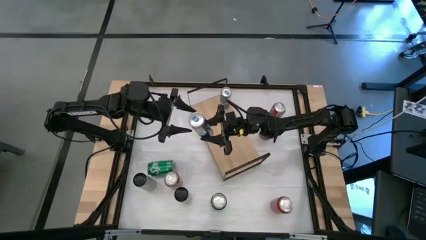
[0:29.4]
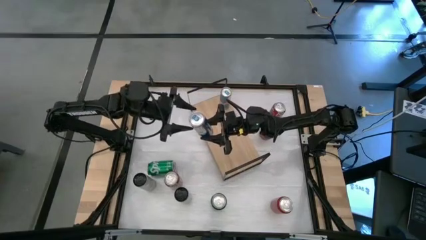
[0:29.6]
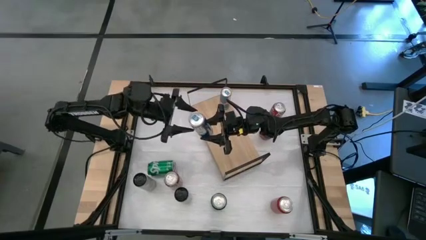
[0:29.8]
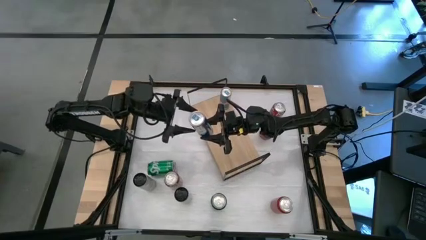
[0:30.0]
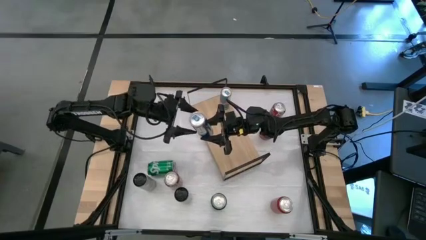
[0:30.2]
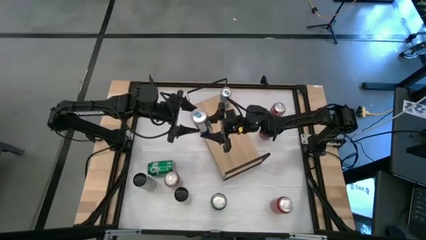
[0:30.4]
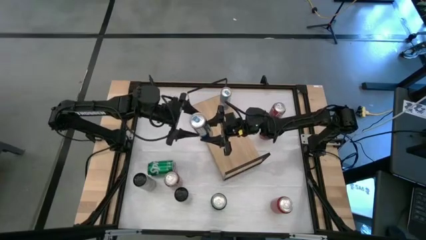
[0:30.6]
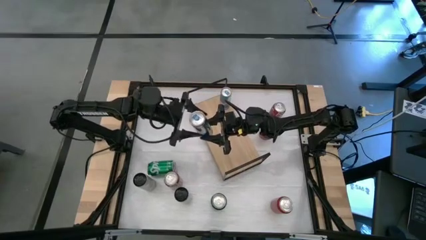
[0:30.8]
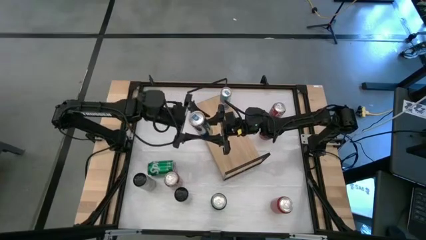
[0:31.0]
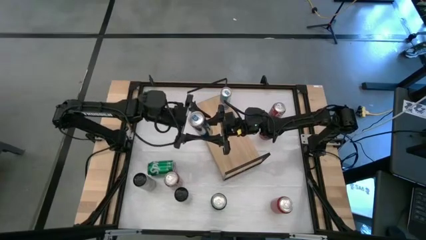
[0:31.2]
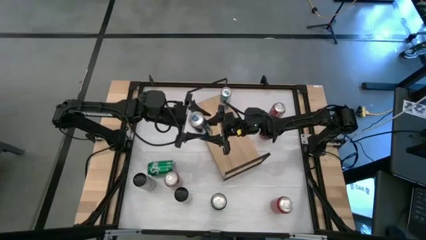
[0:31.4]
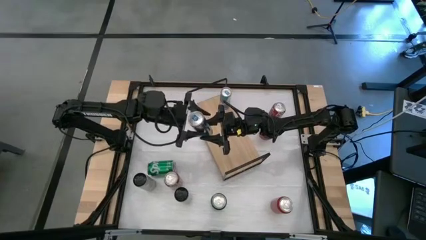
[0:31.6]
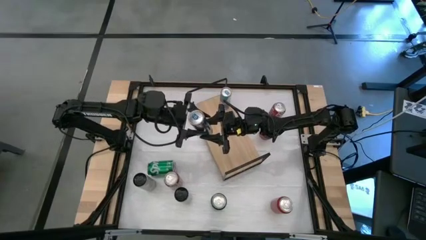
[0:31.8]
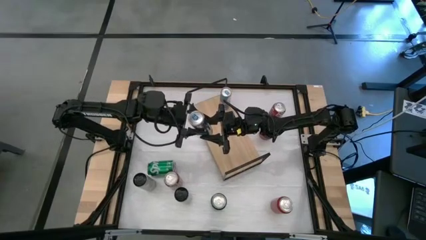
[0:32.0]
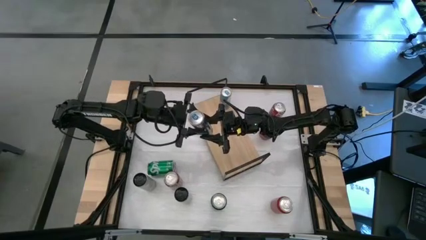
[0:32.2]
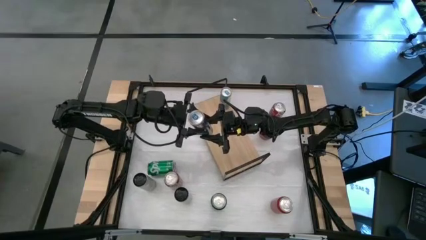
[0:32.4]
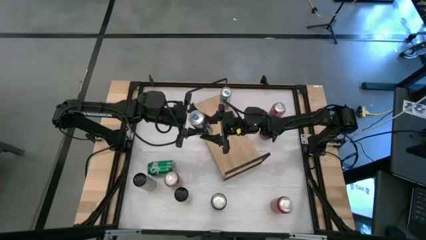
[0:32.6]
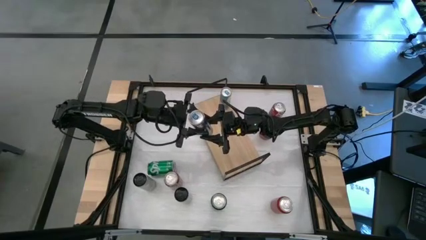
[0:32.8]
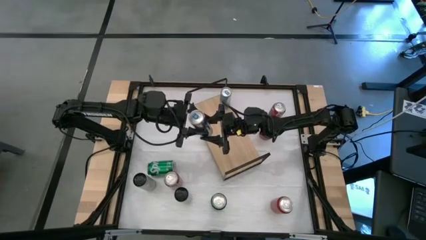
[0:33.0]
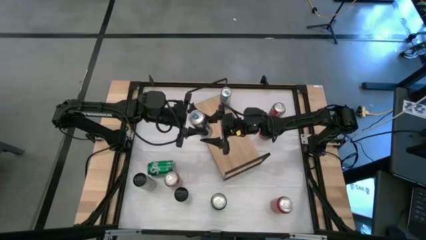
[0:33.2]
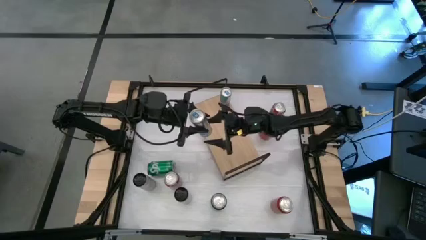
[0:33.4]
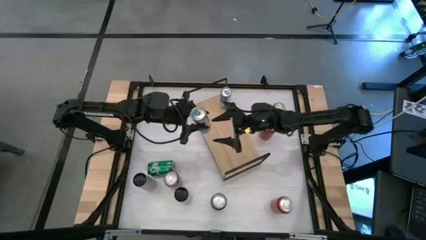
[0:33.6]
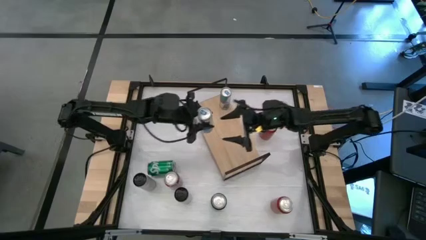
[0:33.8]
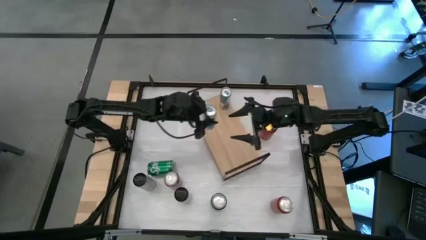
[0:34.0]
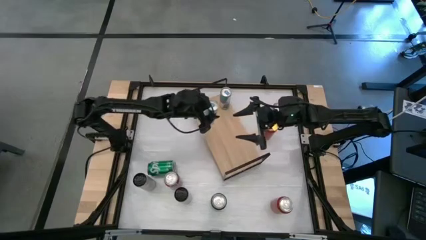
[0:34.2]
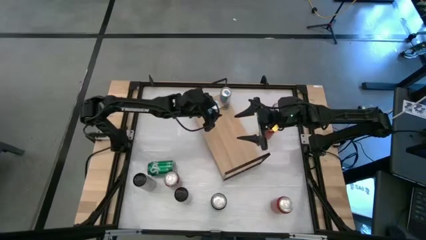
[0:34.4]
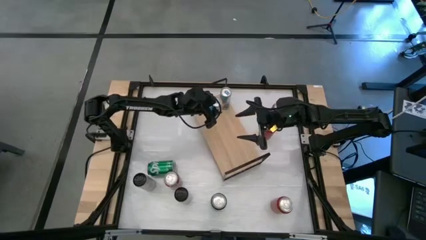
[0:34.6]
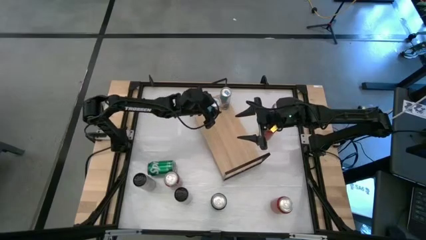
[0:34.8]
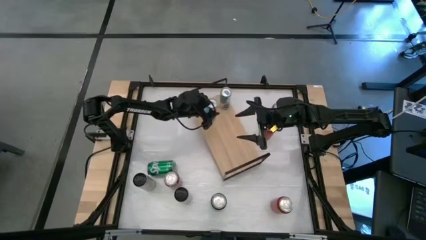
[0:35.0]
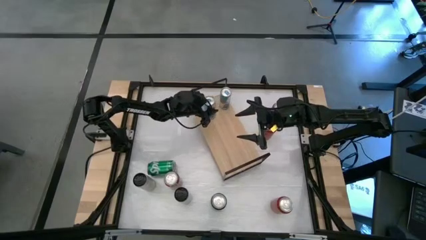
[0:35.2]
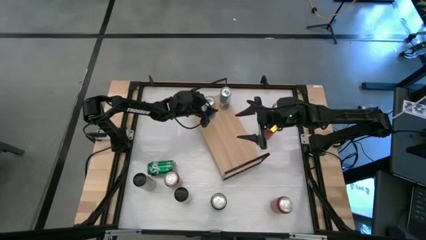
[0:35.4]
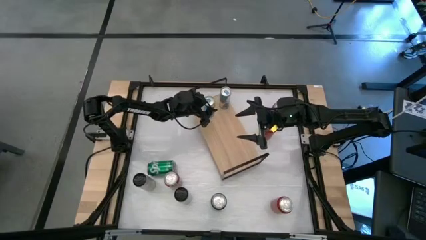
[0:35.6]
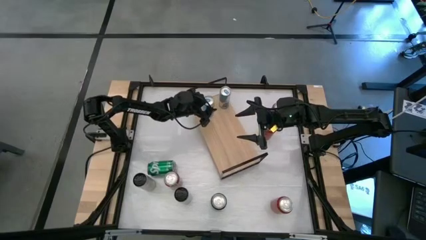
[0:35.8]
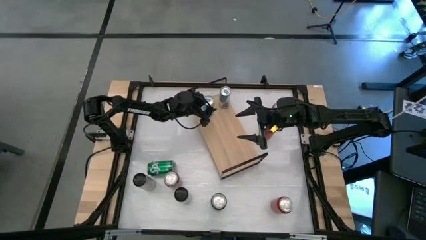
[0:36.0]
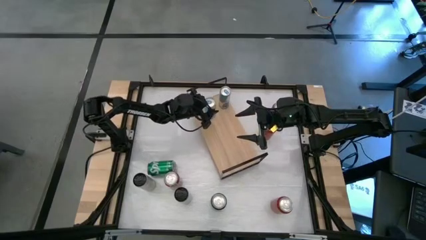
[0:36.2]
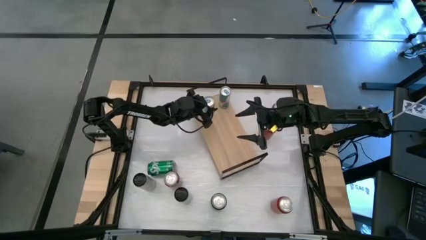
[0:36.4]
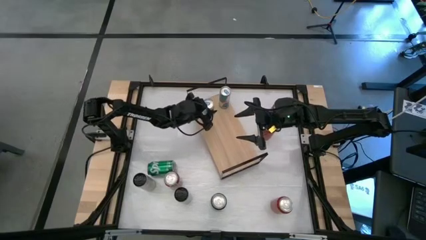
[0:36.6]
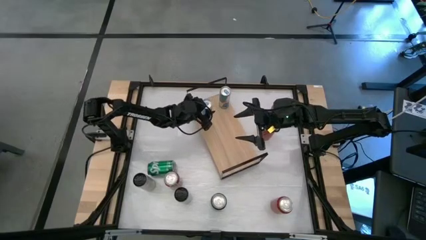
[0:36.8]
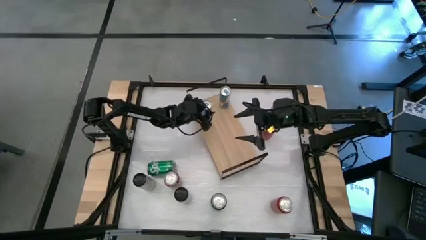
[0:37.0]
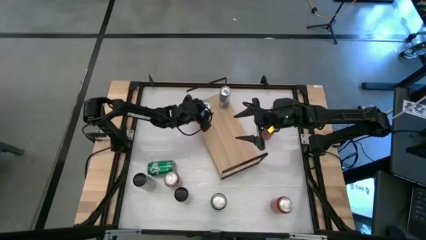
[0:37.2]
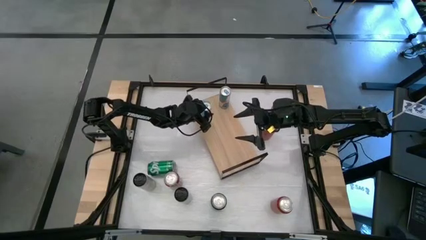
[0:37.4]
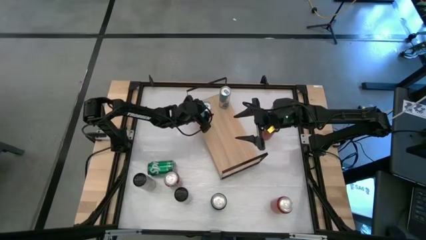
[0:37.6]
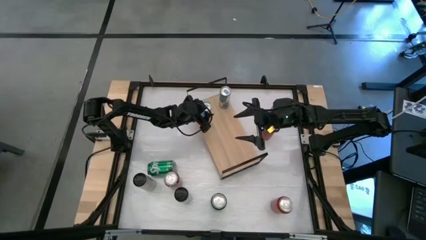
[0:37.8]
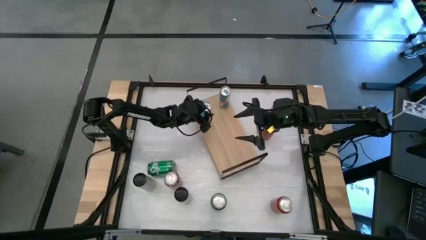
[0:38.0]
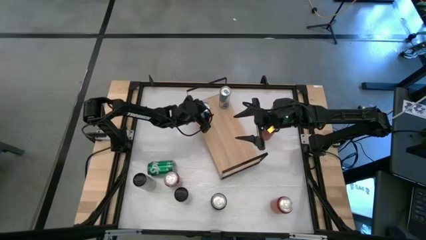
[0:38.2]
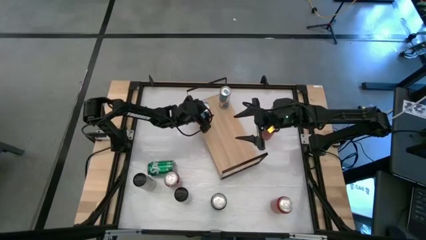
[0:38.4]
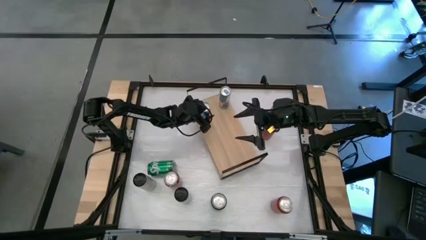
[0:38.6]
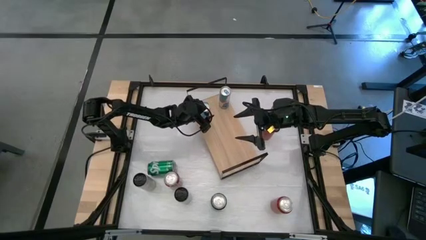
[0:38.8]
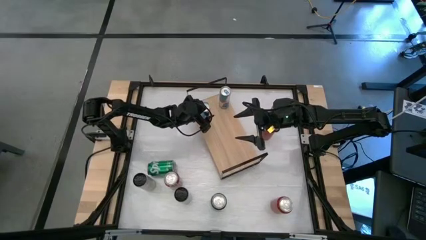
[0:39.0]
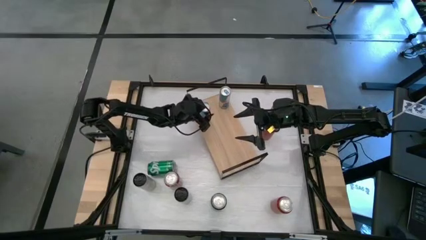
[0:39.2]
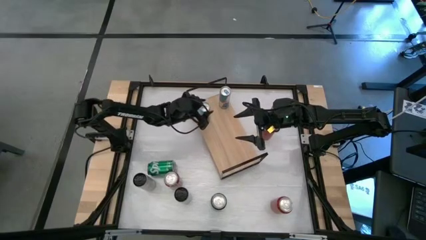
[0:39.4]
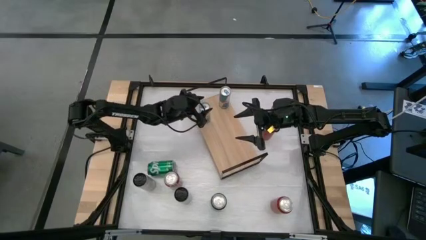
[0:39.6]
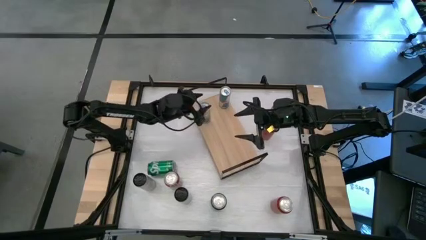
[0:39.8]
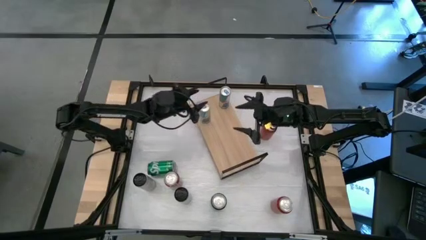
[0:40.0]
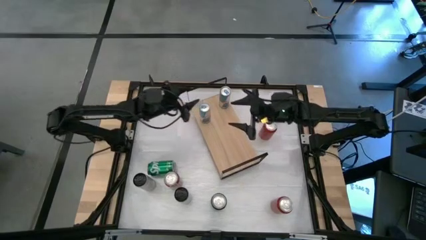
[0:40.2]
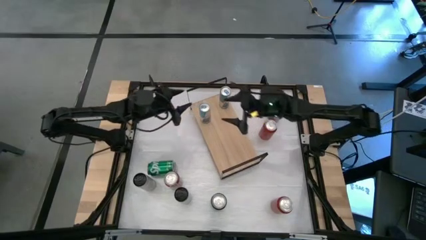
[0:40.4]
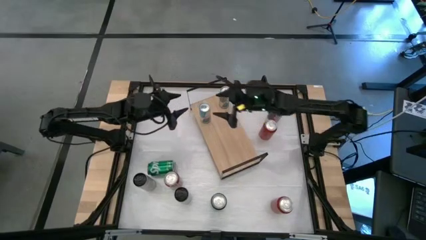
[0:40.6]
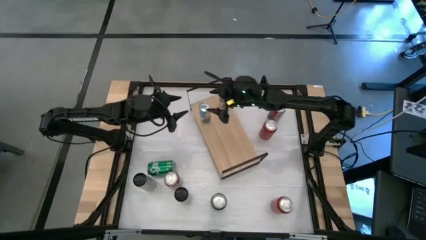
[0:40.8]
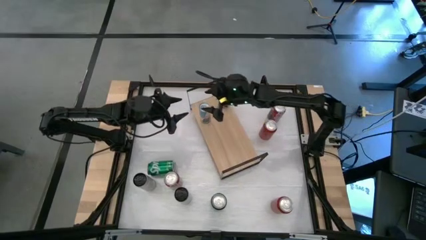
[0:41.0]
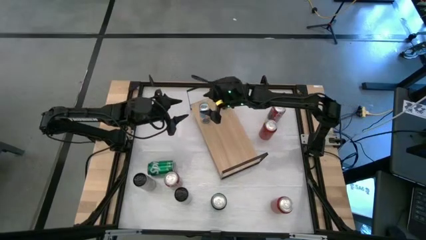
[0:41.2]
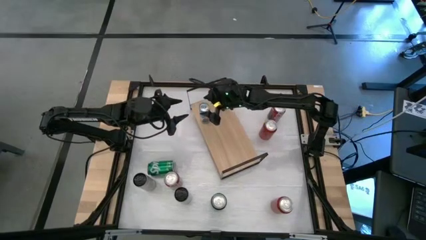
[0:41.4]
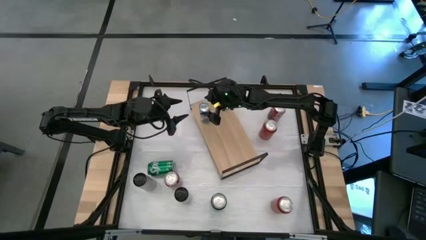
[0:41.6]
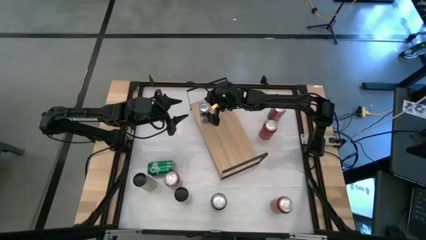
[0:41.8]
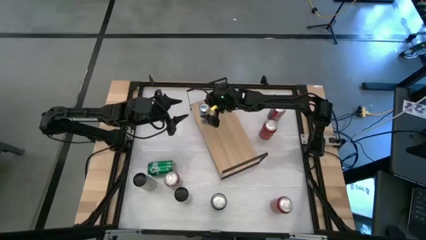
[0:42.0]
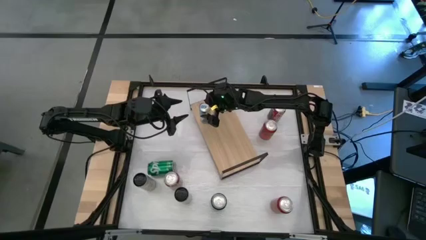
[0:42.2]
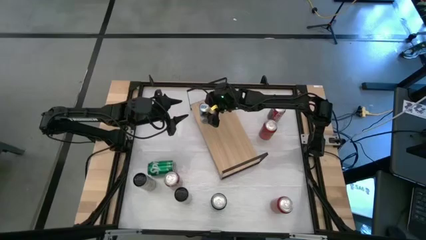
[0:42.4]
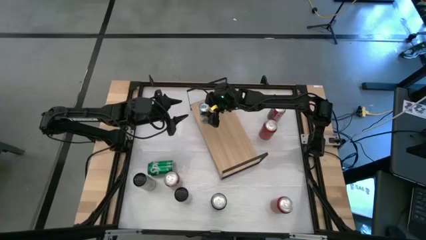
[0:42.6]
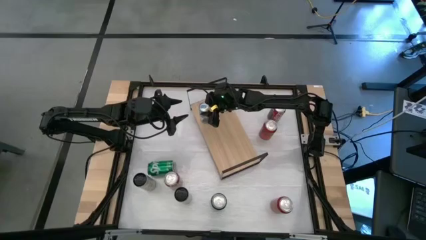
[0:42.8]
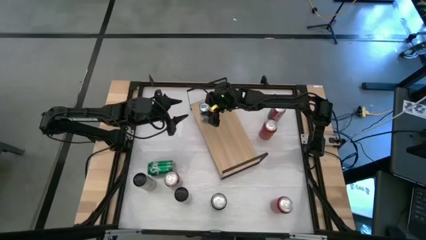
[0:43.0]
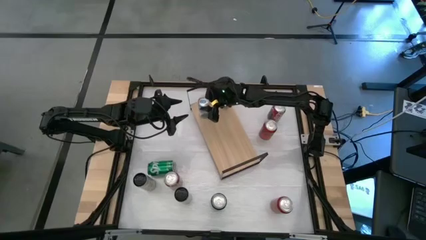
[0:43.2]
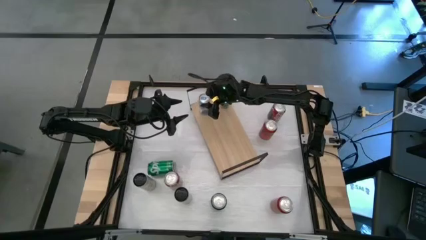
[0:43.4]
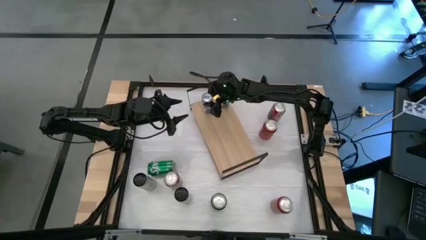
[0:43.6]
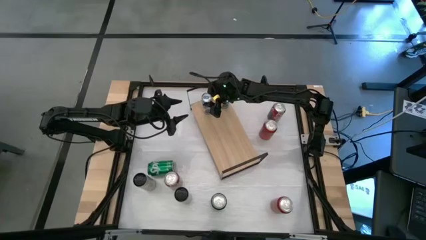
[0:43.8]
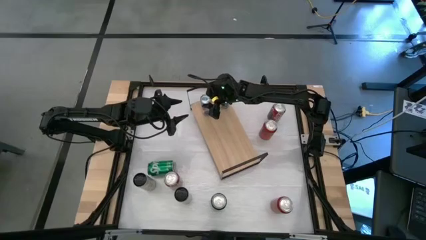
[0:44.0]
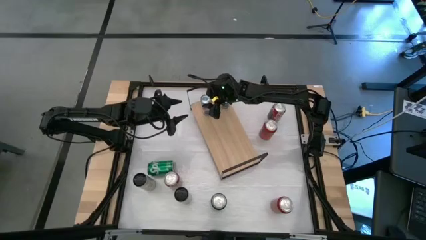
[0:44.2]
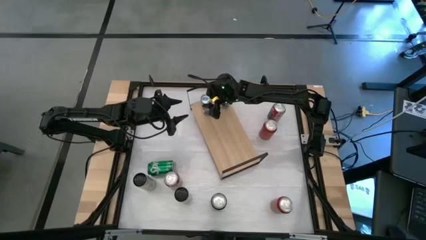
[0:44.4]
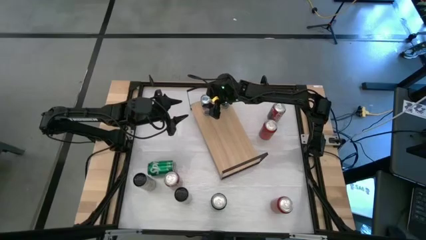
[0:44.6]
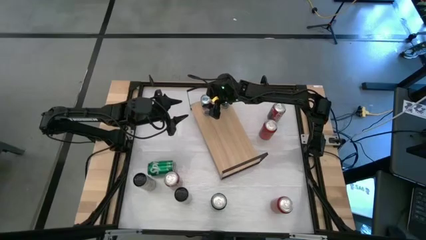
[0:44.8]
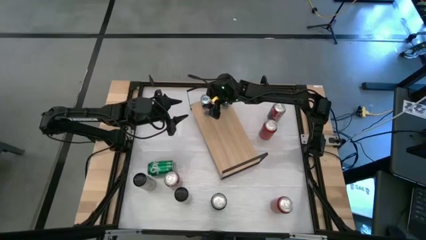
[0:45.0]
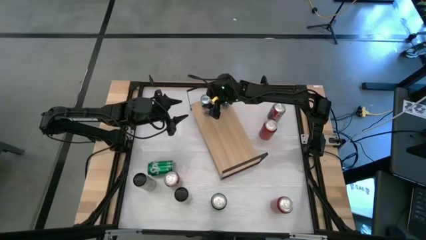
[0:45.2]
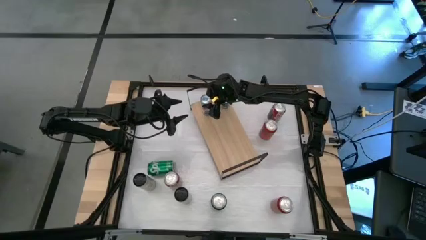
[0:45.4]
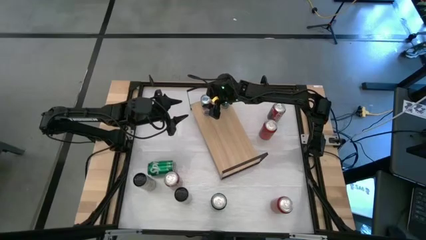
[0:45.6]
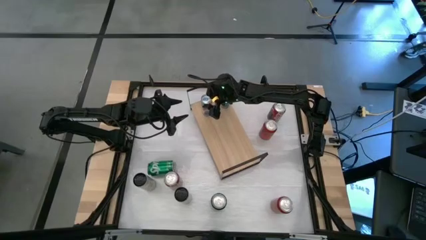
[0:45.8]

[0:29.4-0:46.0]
Task: Place canned beverage on shelf
Put the blue soda can on the shelf aligned with the other blue soda can
